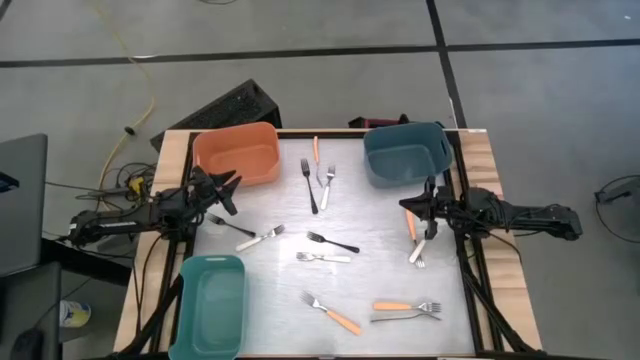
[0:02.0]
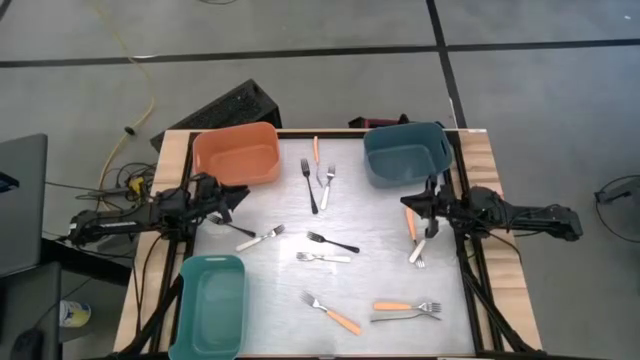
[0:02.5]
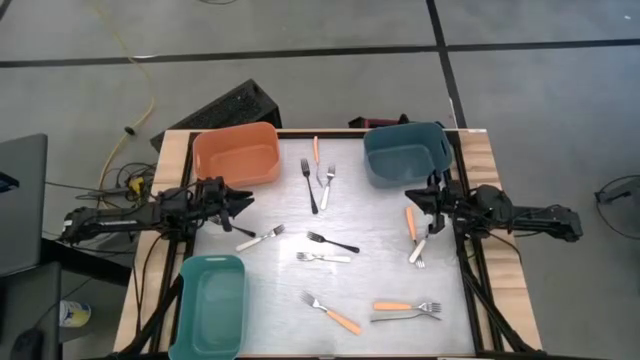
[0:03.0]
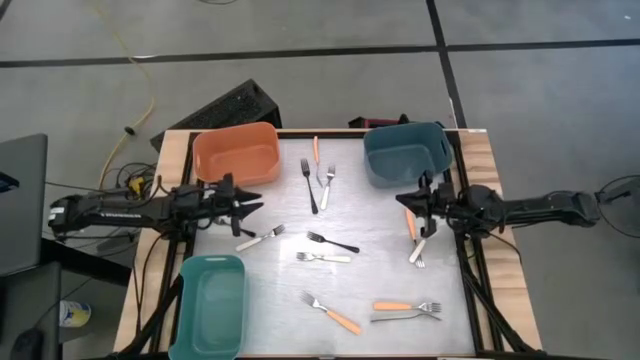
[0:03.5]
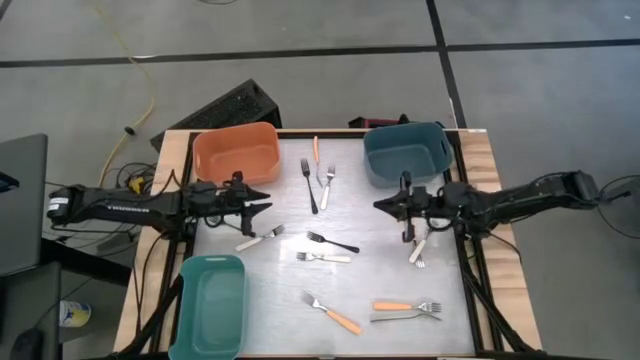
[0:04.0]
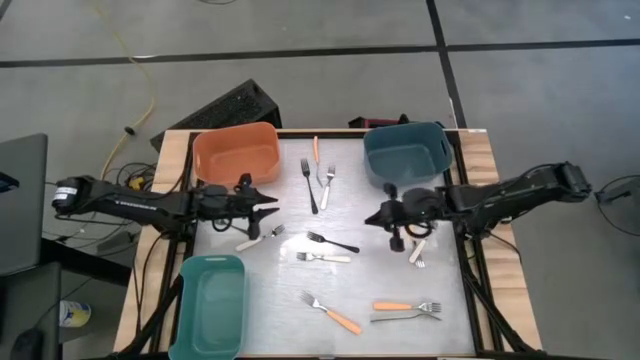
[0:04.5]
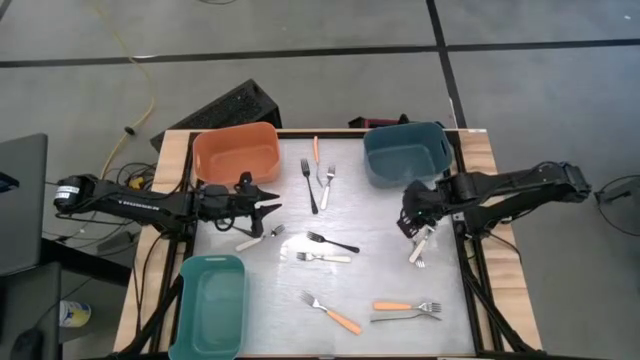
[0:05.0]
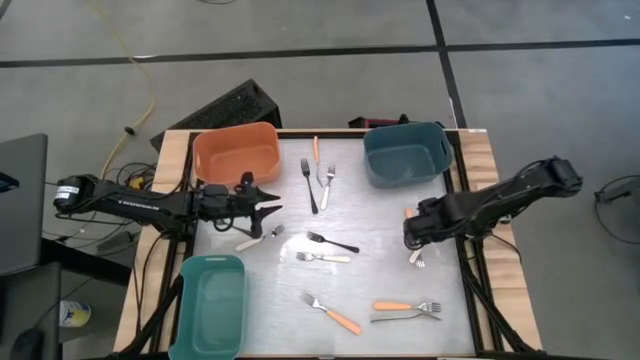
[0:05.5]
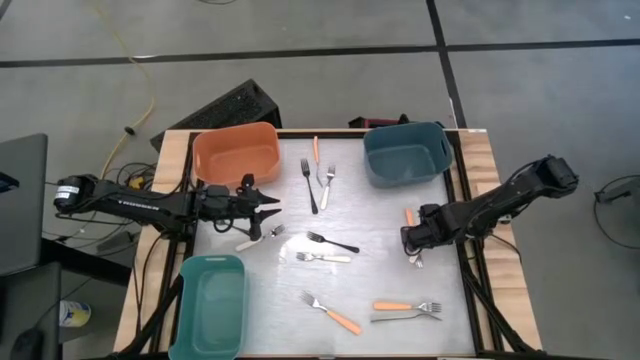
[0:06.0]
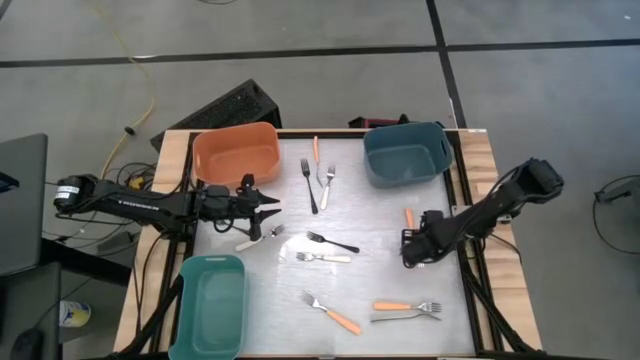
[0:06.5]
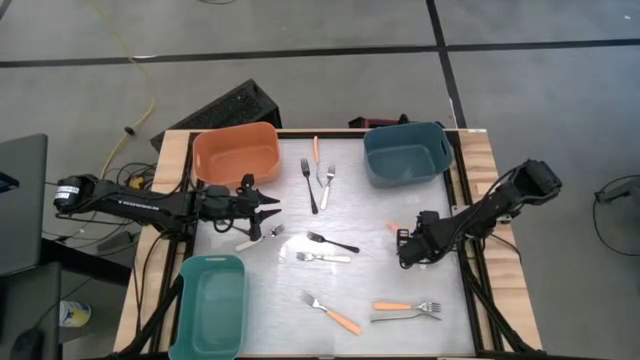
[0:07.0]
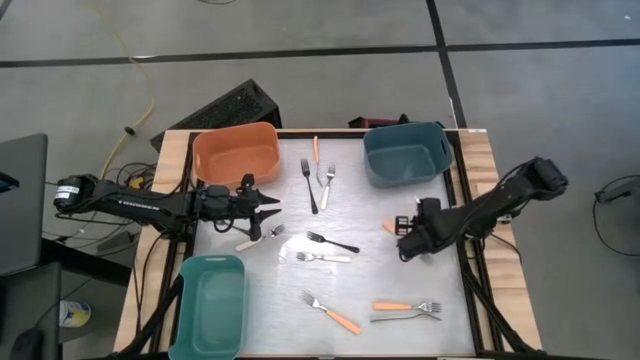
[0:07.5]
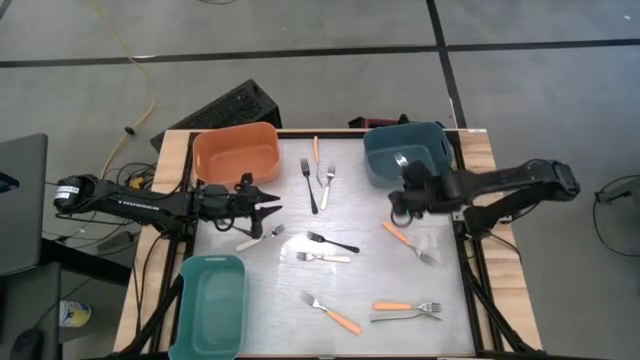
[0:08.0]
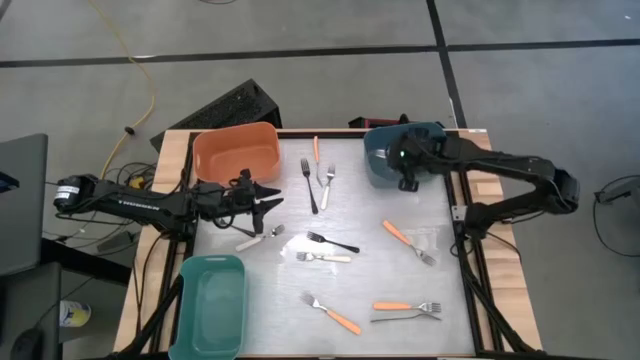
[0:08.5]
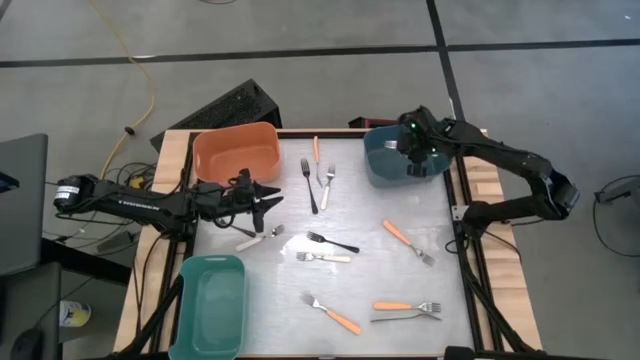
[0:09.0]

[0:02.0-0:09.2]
Task: Sort silverware by color (type)
Put the white fork into the blue bin

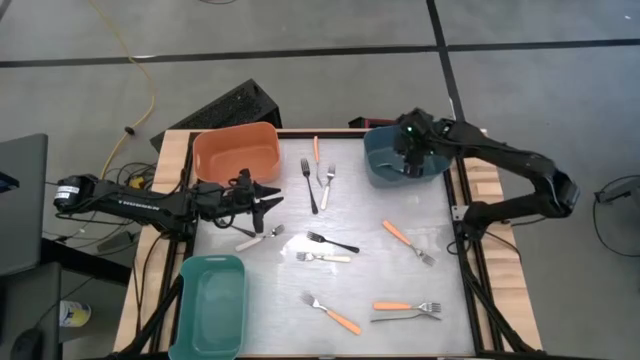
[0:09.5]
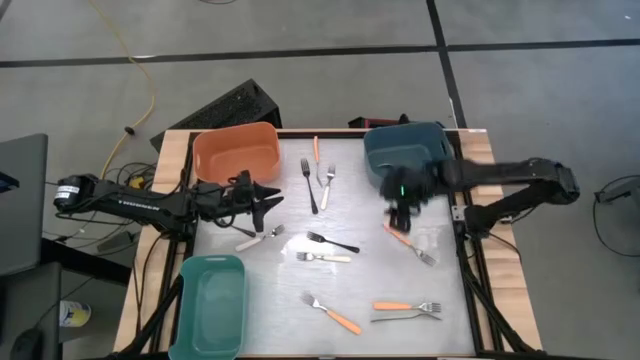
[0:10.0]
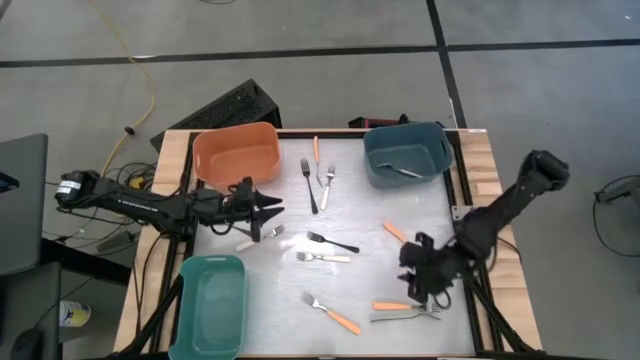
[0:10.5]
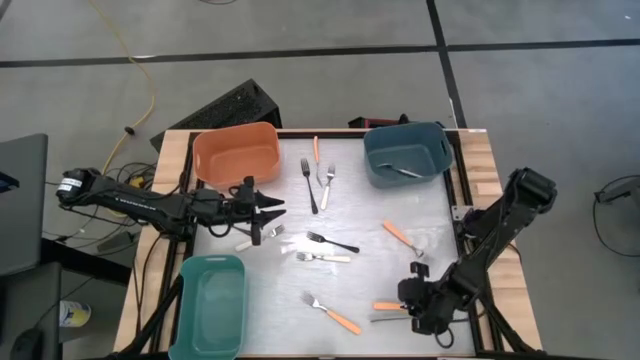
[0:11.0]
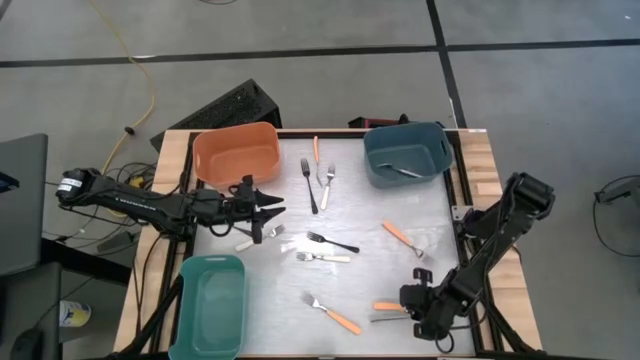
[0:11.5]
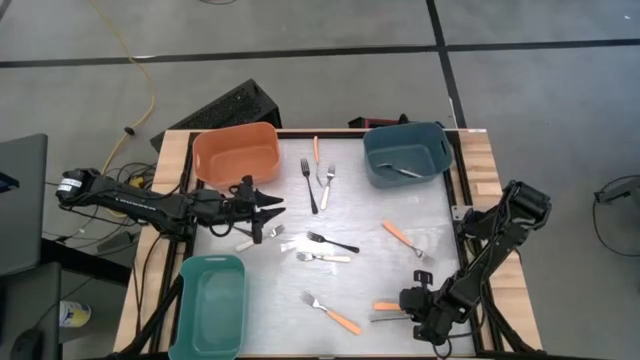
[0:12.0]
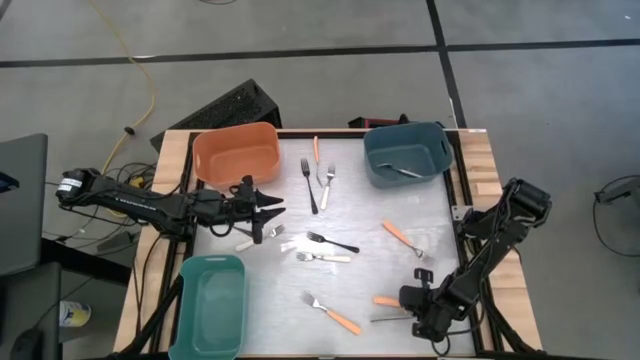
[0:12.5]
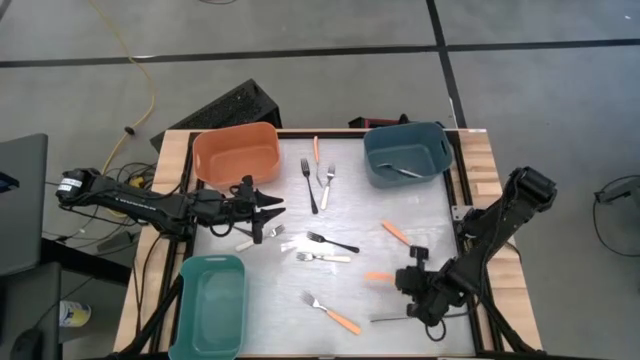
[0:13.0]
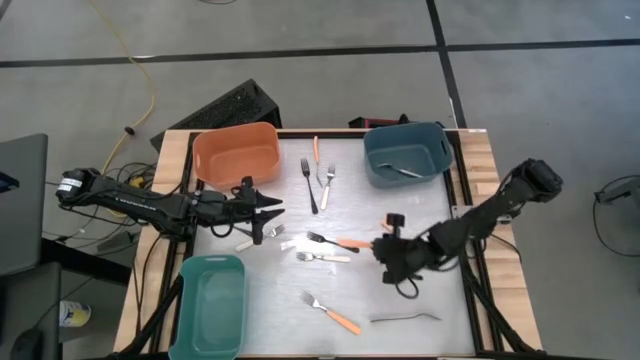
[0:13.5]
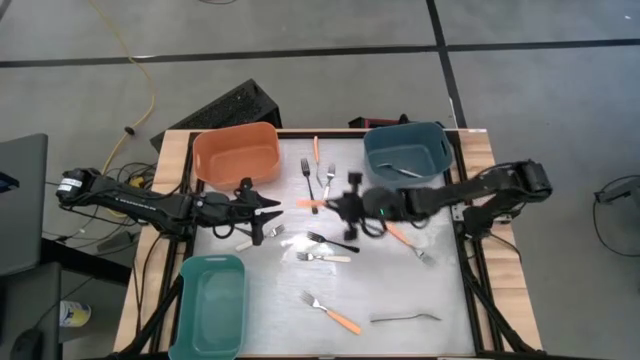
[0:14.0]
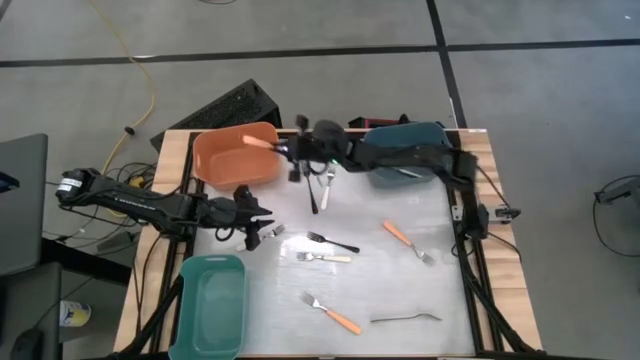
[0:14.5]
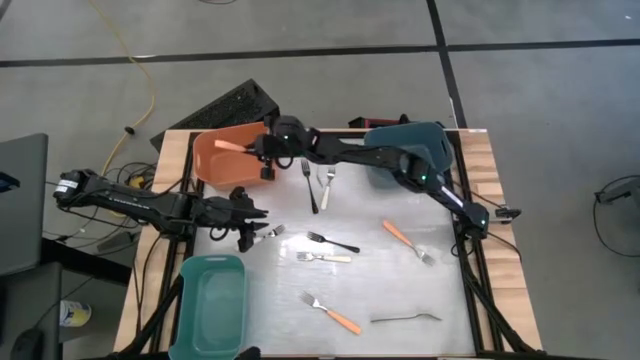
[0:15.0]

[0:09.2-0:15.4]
Put the orange fork into the orange bin

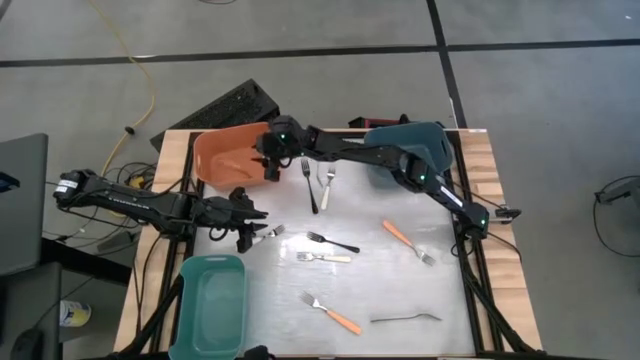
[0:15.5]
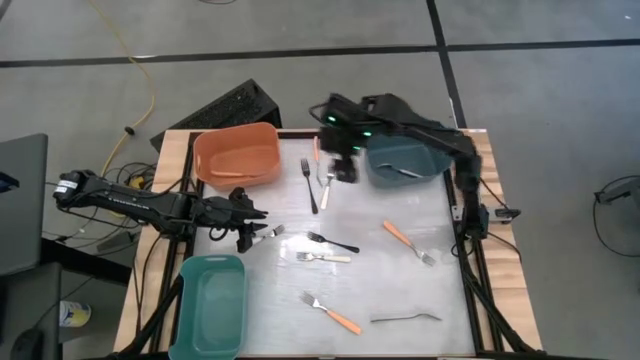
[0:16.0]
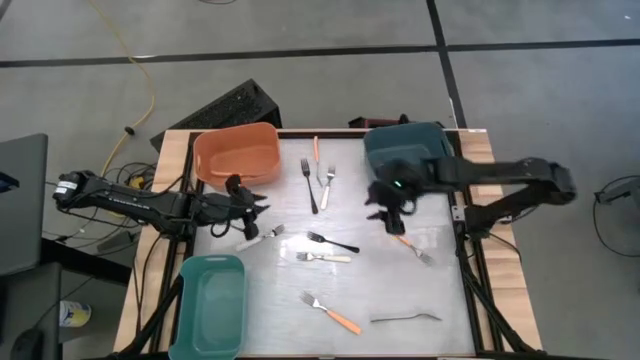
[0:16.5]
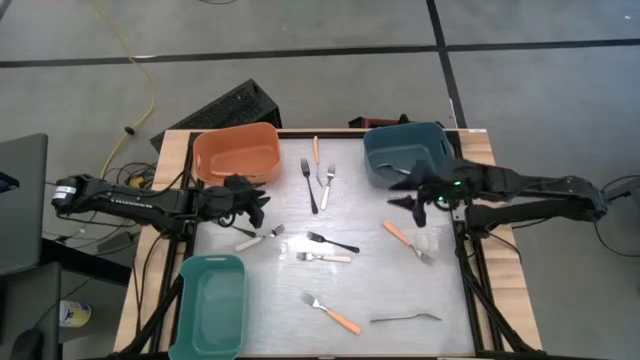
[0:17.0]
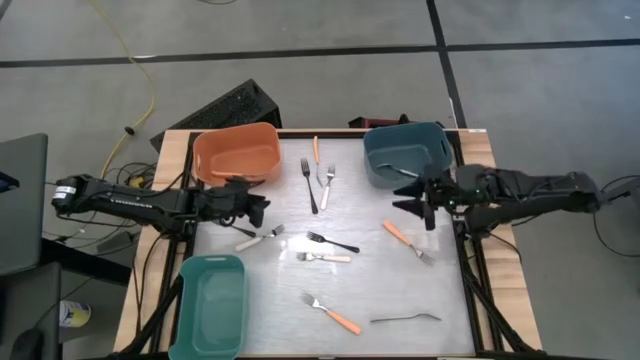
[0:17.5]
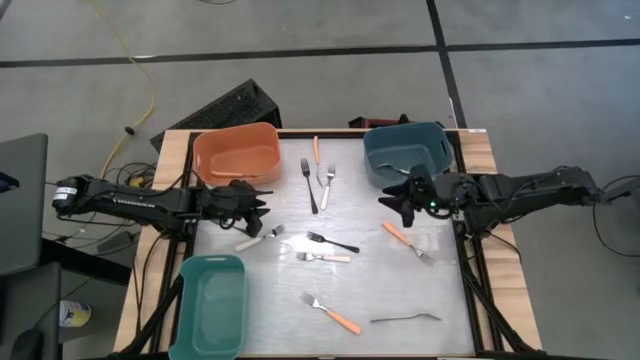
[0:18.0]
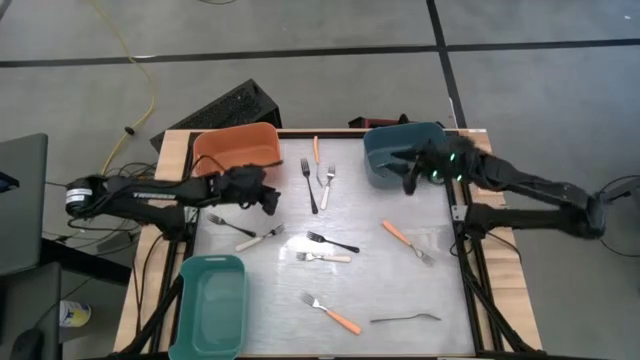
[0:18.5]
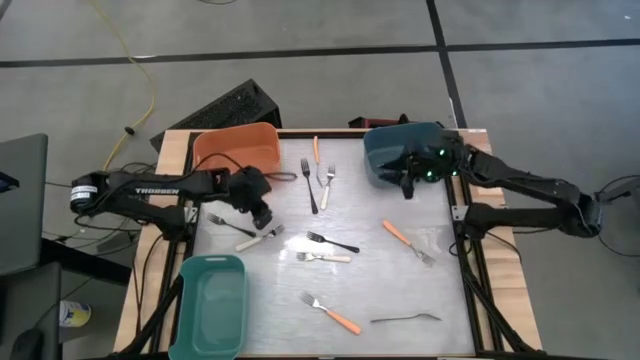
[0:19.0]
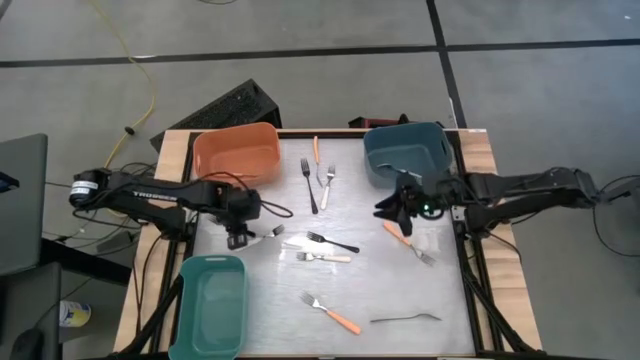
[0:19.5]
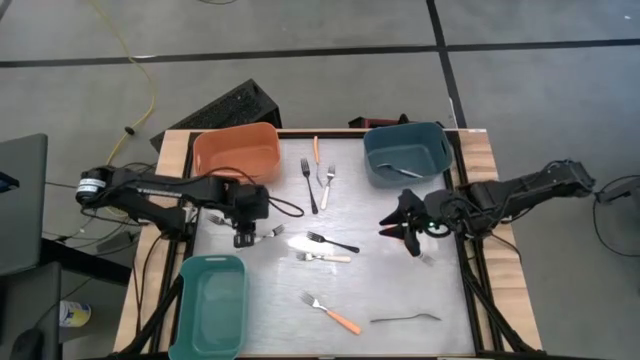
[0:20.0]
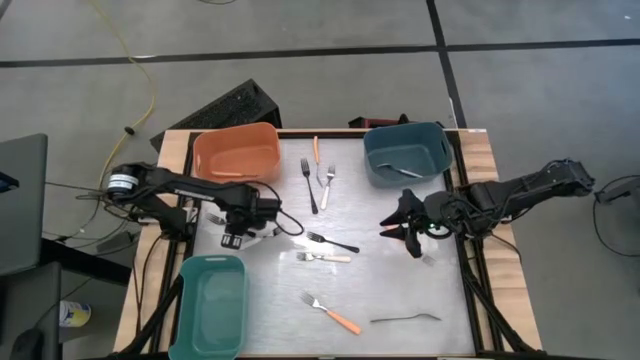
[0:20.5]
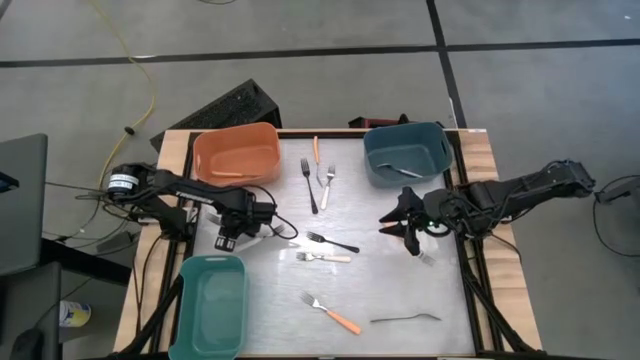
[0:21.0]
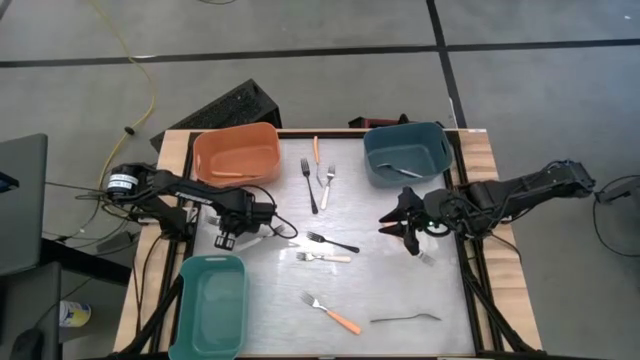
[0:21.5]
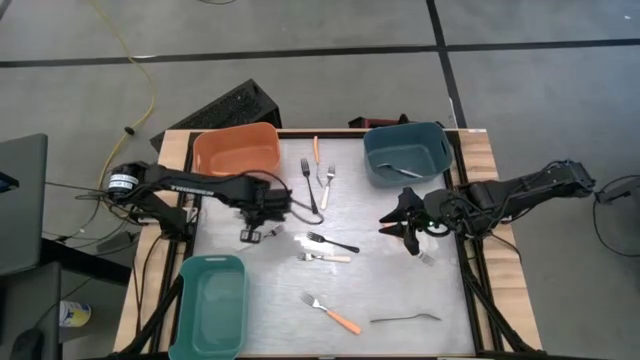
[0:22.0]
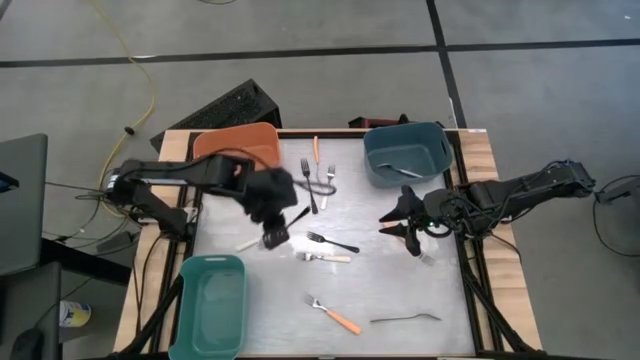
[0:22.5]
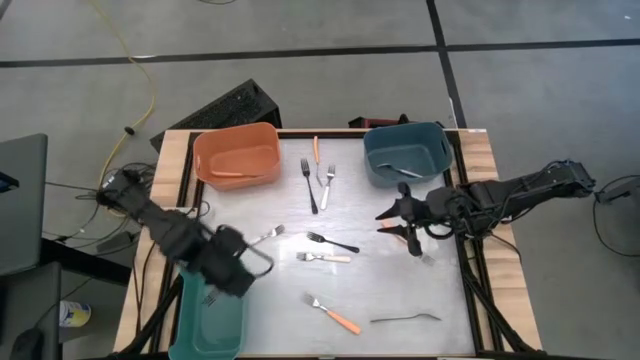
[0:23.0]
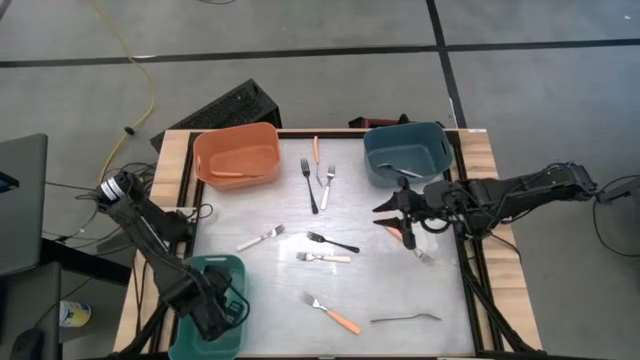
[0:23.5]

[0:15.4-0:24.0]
Put the black fork into the green bin
